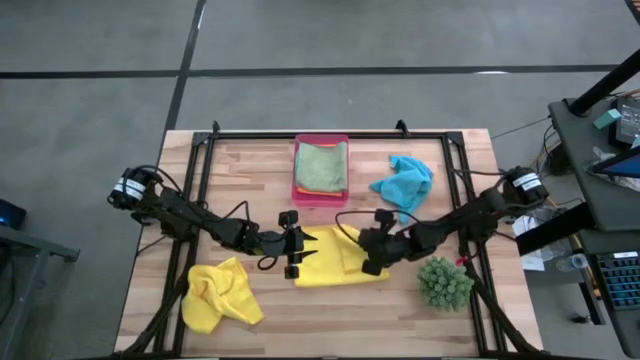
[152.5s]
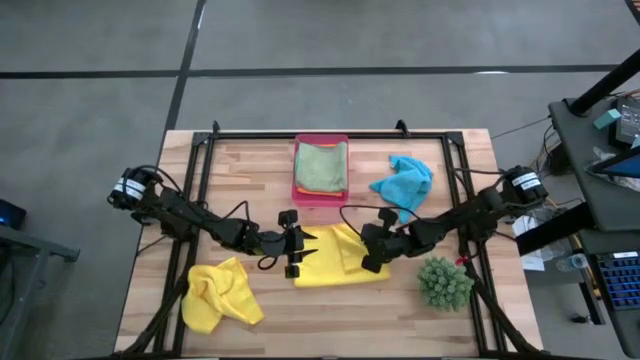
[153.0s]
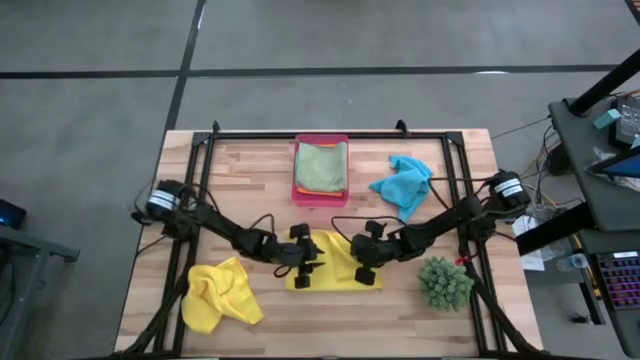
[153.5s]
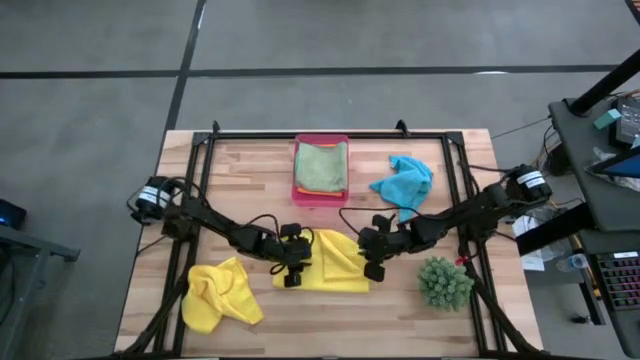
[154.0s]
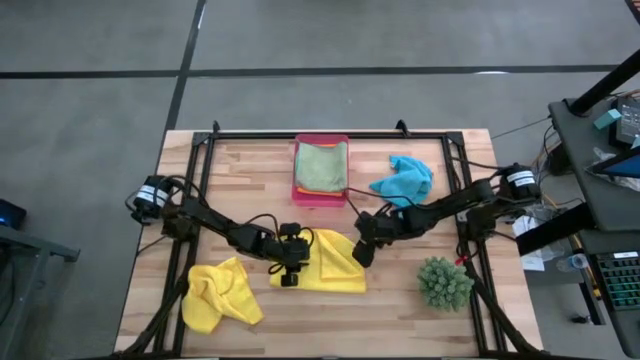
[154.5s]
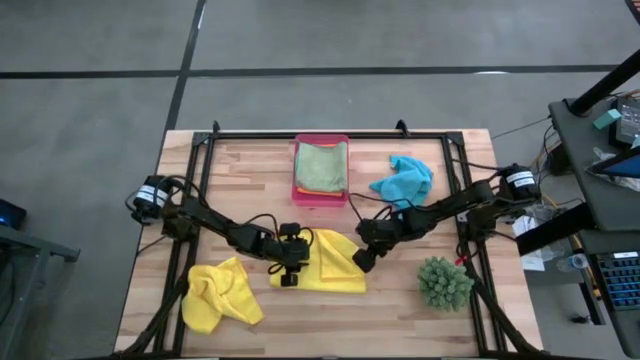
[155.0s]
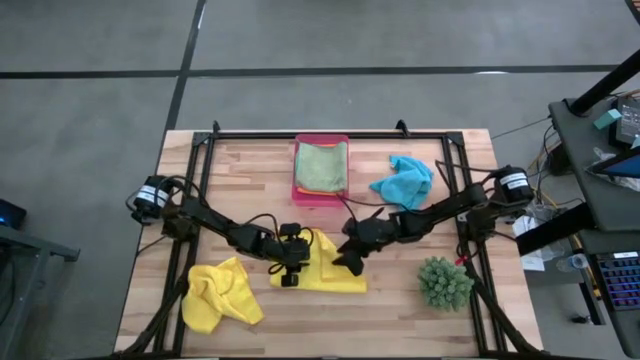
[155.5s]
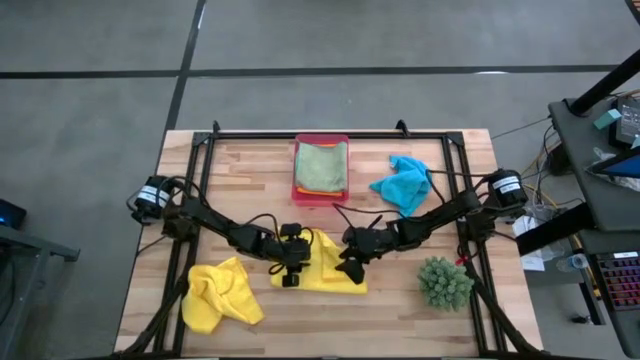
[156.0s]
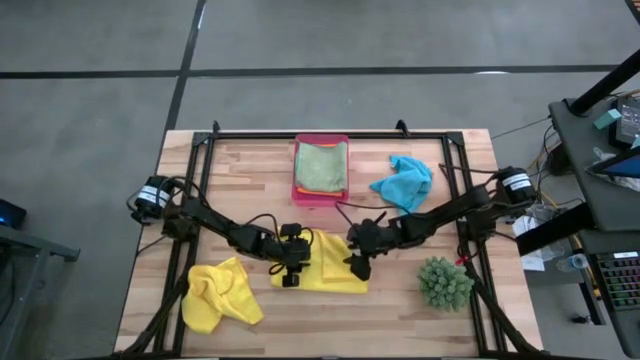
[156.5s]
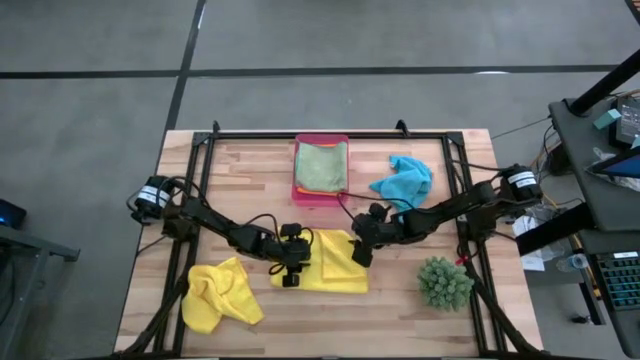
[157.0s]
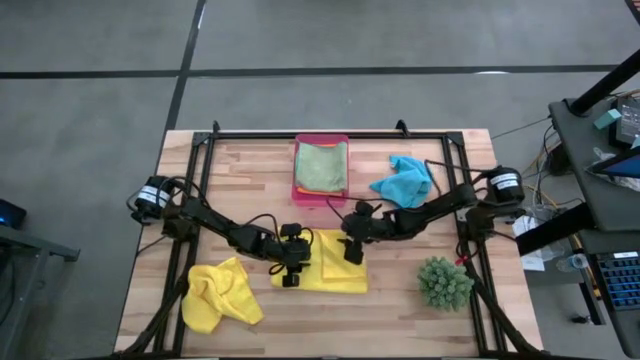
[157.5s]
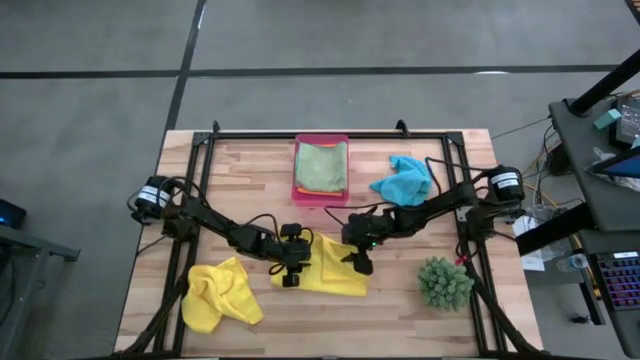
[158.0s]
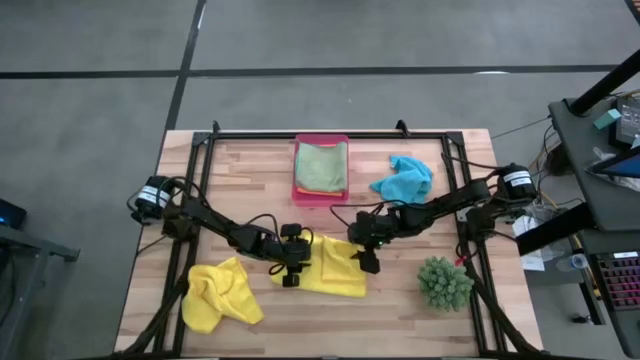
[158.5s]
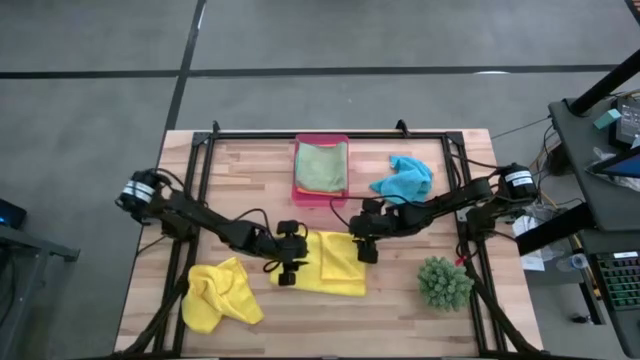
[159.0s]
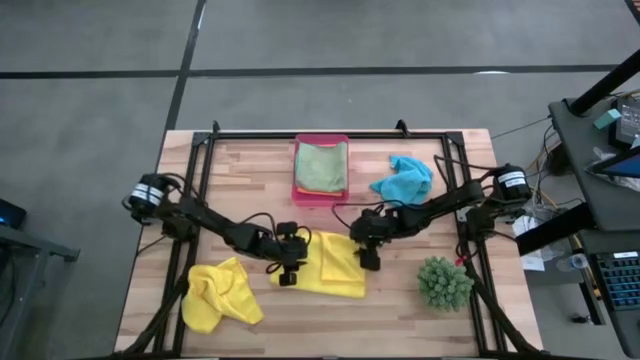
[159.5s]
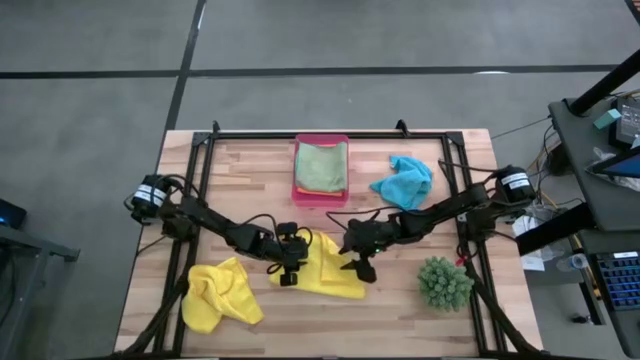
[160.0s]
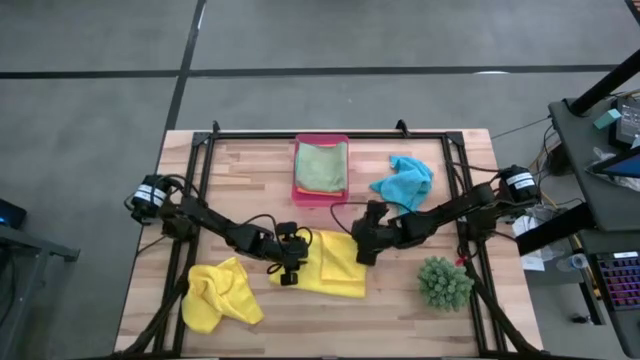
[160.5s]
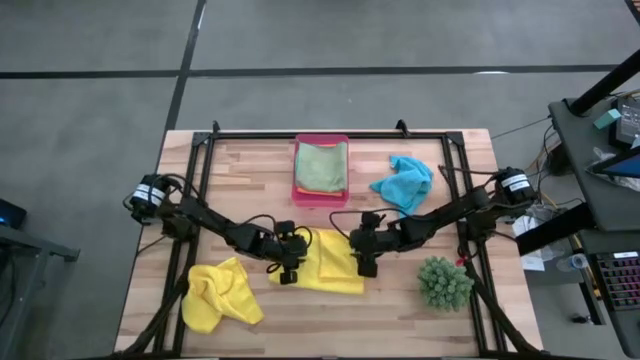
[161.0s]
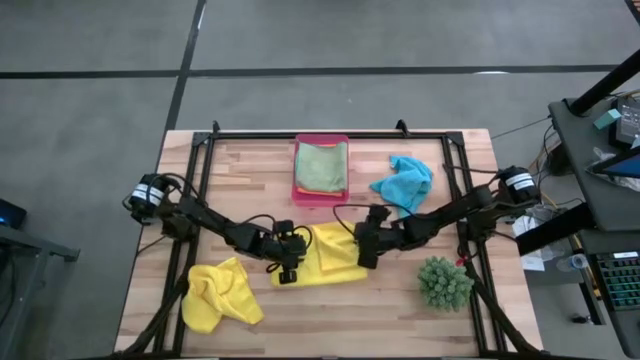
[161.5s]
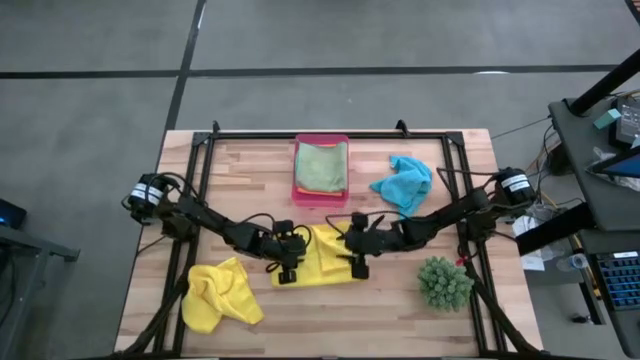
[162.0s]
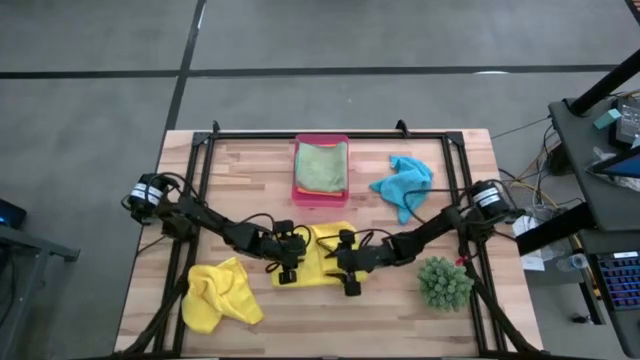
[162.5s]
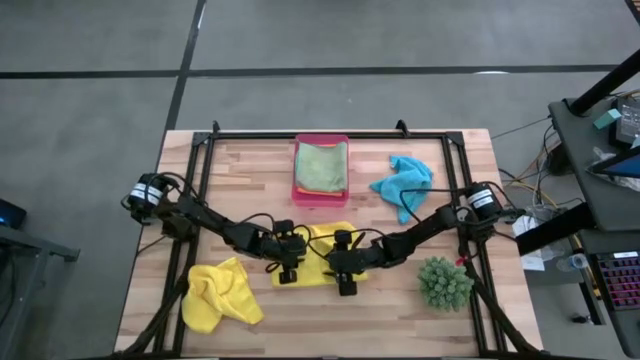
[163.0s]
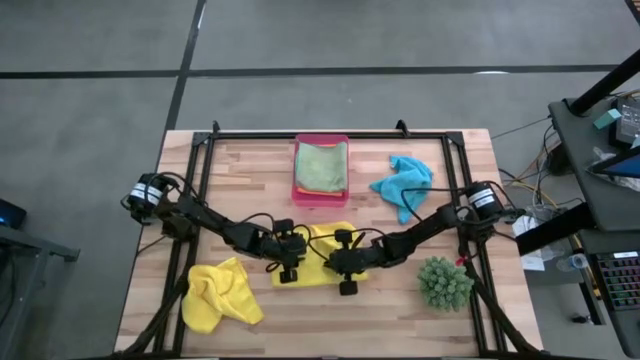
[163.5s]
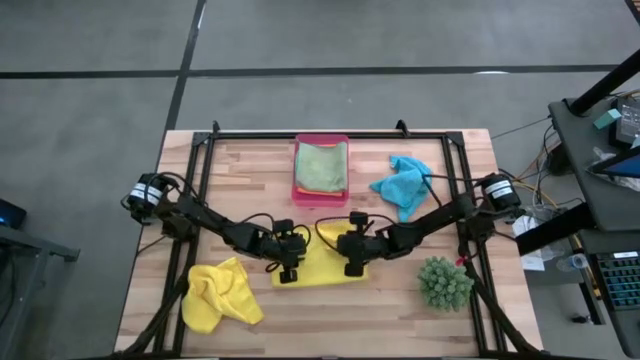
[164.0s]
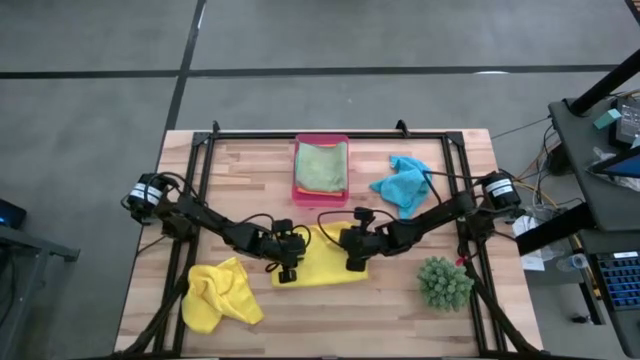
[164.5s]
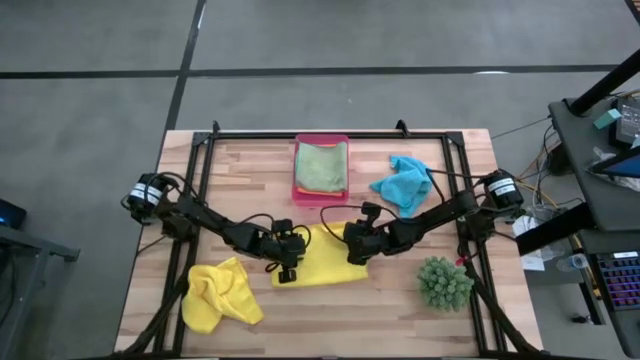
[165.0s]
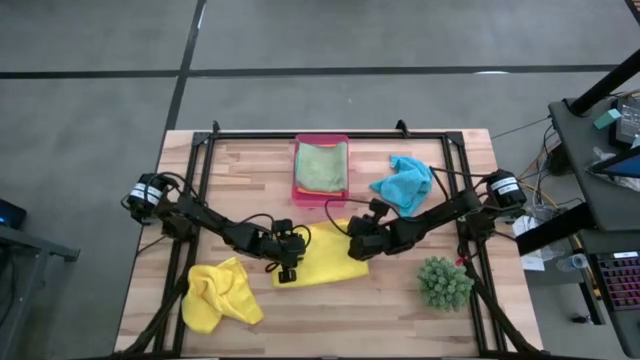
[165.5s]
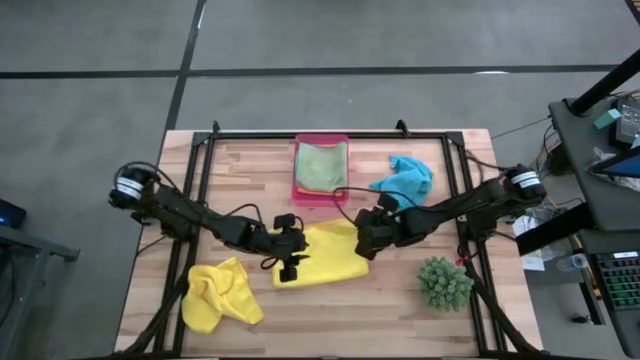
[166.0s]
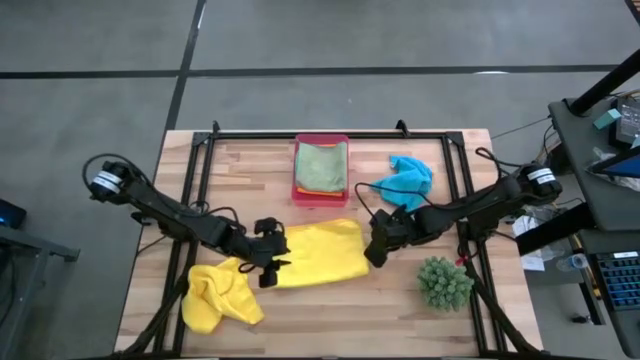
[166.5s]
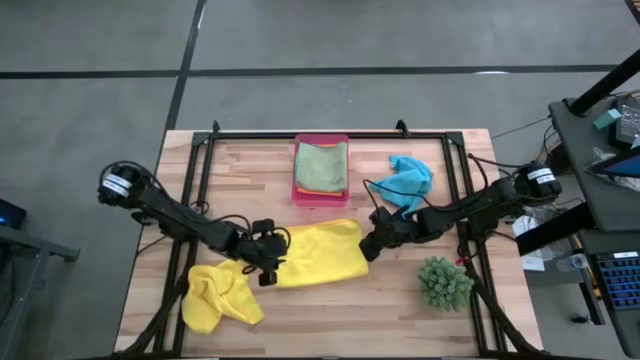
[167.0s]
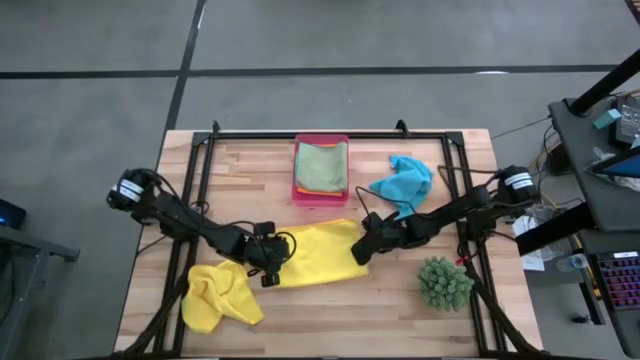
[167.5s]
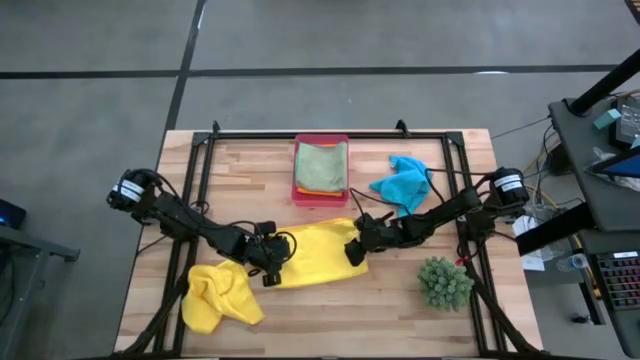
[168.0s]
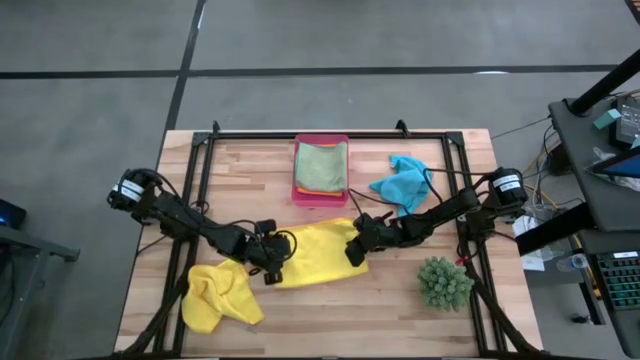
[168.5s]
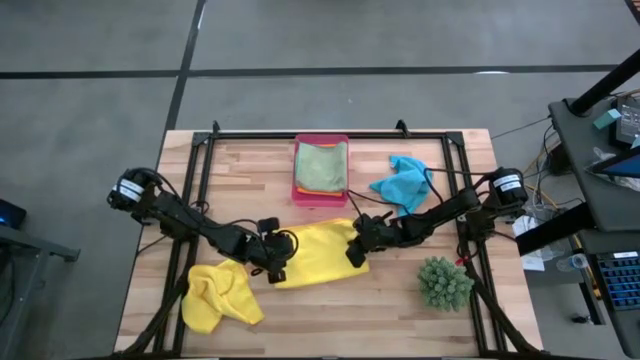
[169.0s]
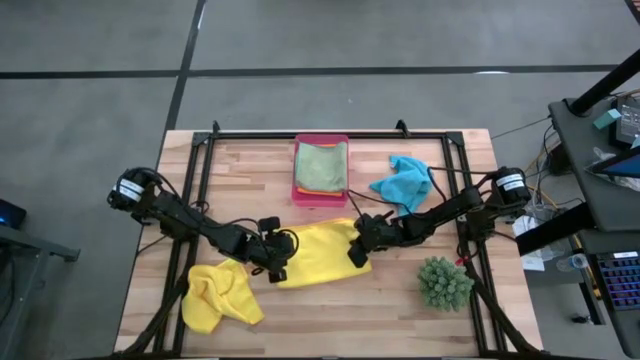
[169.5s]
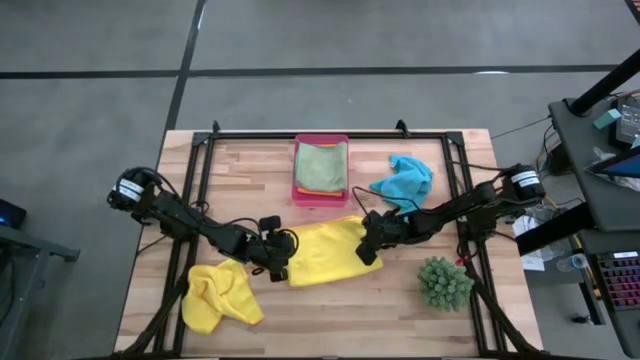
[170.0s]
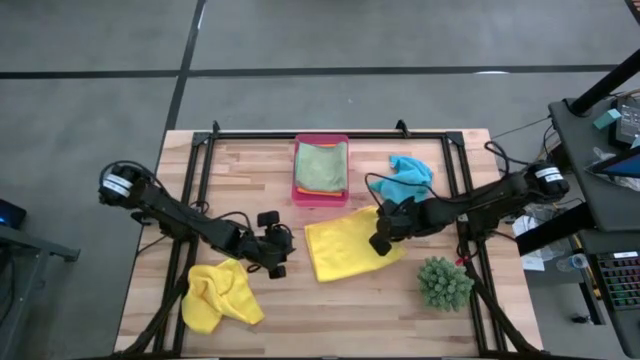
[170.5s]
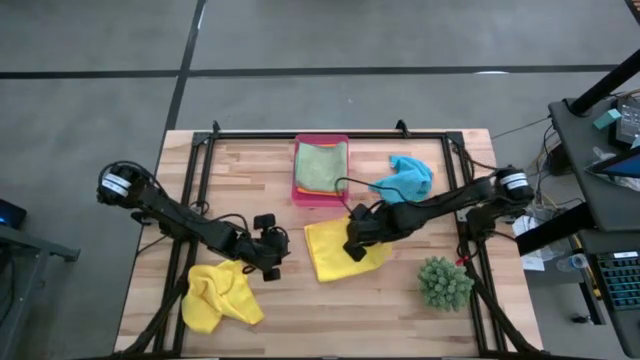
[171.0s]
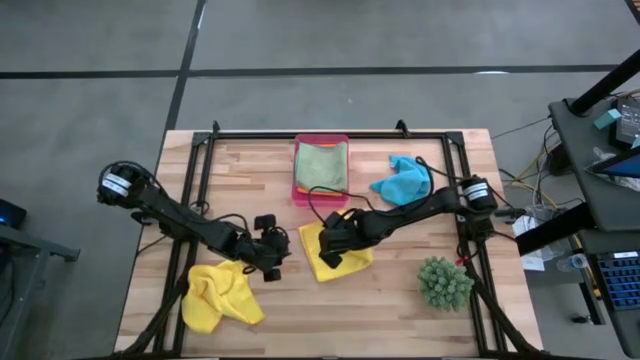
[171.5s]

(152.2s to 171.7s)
Task: Fold microfiber towels
Fold the top yellow towel
